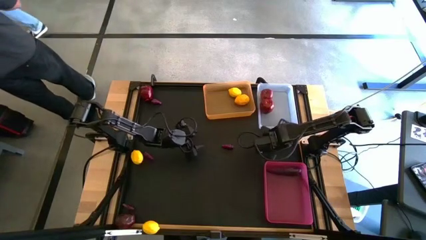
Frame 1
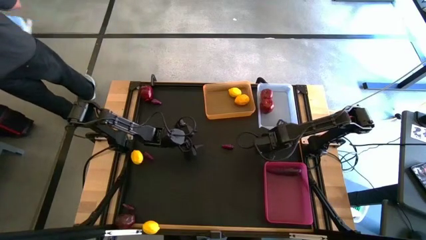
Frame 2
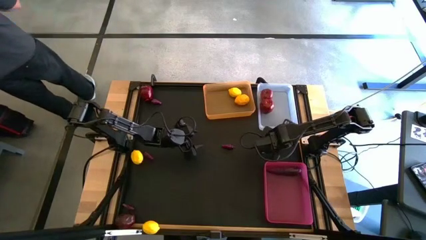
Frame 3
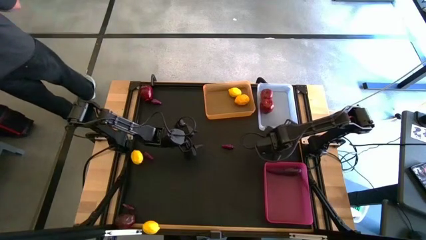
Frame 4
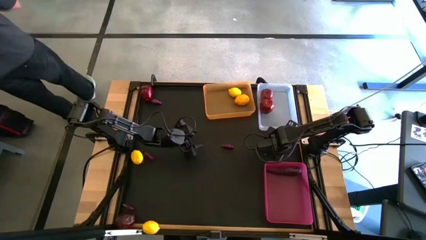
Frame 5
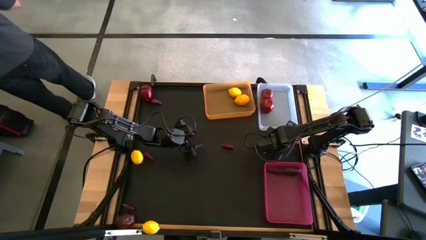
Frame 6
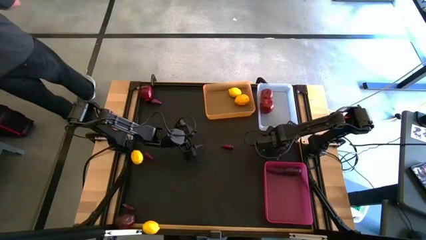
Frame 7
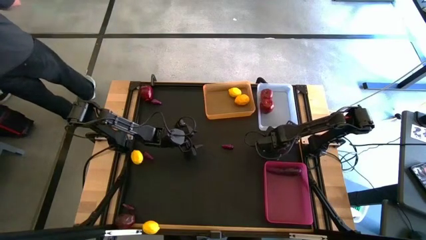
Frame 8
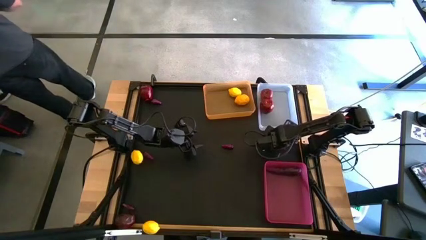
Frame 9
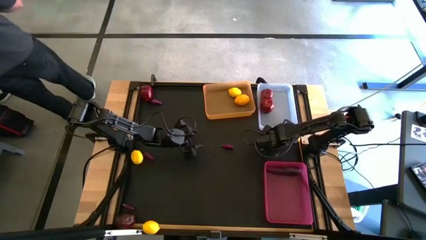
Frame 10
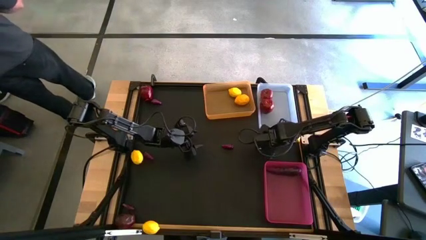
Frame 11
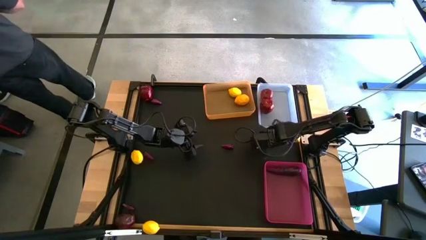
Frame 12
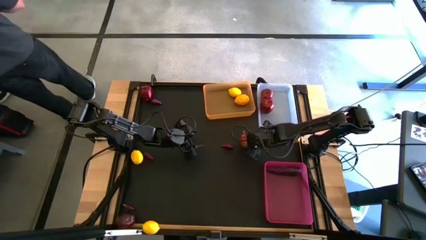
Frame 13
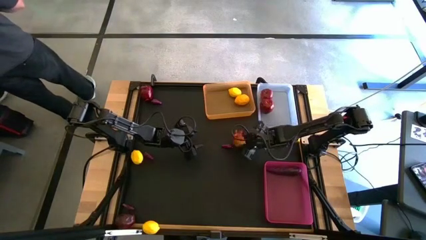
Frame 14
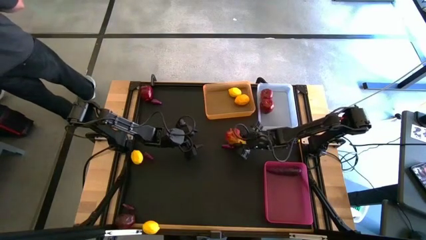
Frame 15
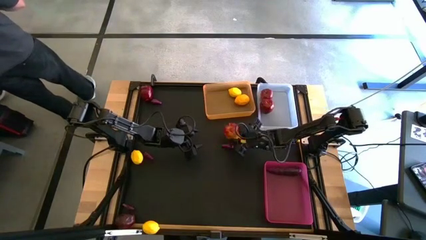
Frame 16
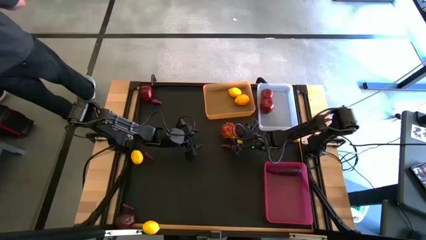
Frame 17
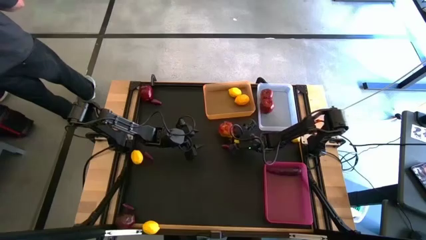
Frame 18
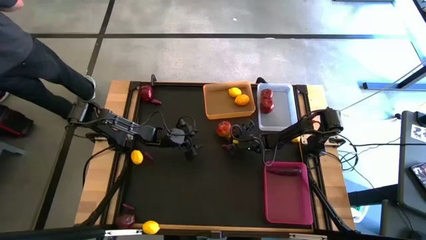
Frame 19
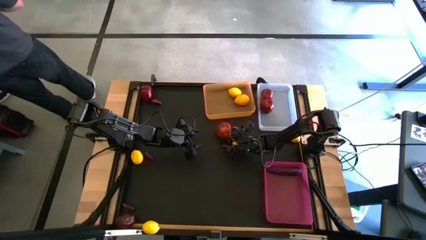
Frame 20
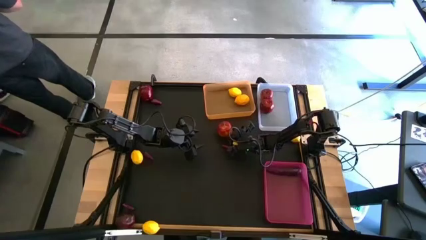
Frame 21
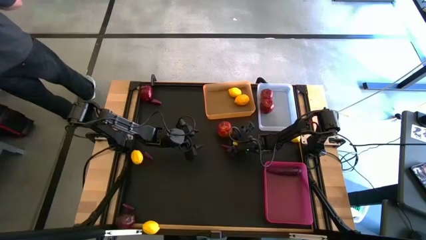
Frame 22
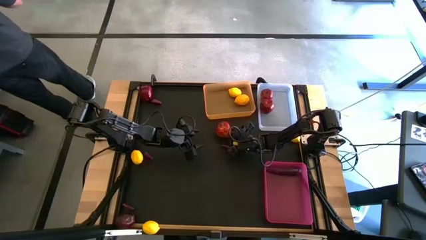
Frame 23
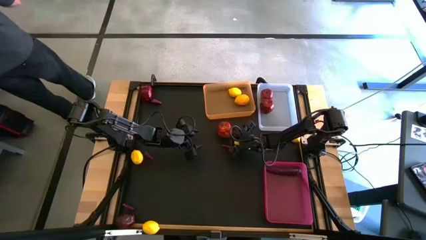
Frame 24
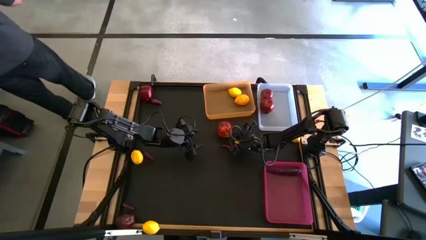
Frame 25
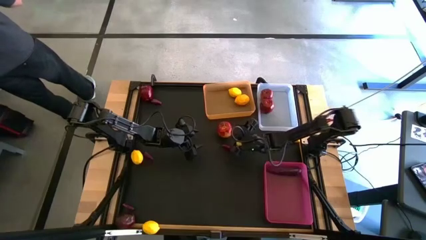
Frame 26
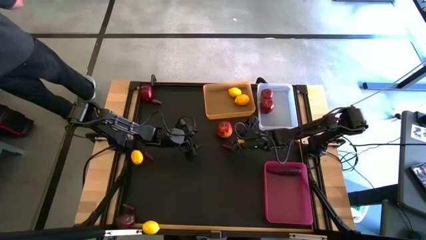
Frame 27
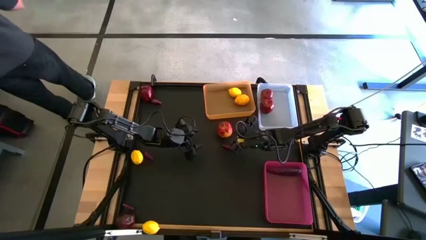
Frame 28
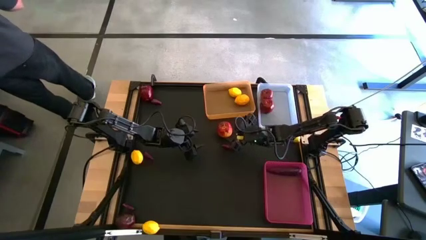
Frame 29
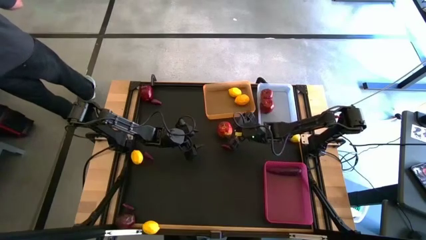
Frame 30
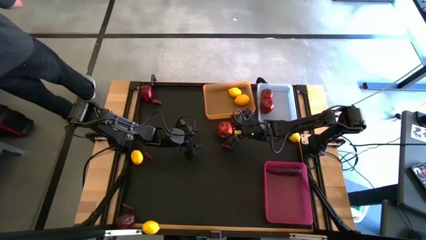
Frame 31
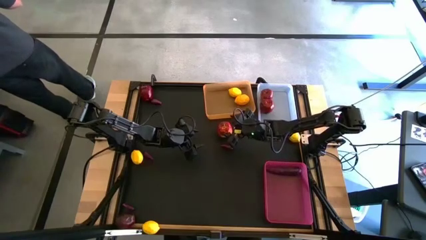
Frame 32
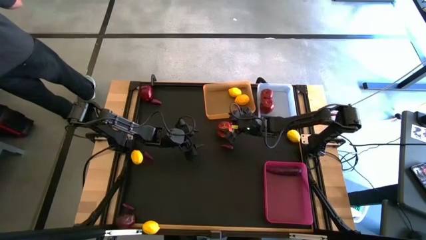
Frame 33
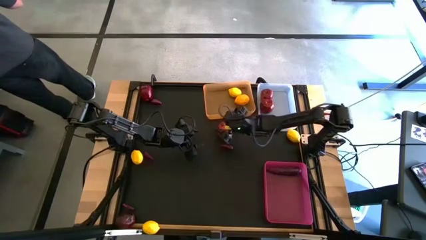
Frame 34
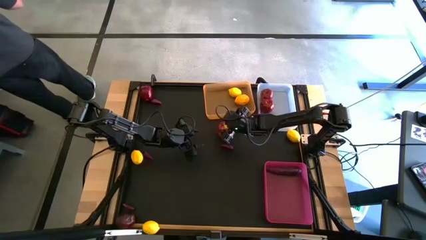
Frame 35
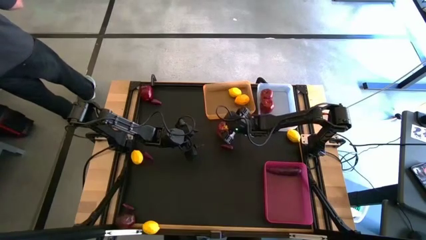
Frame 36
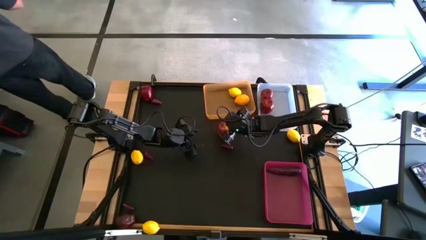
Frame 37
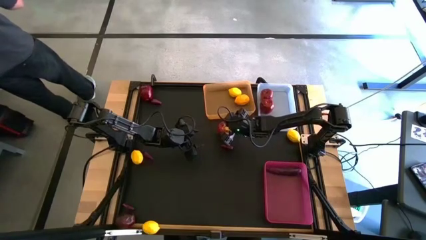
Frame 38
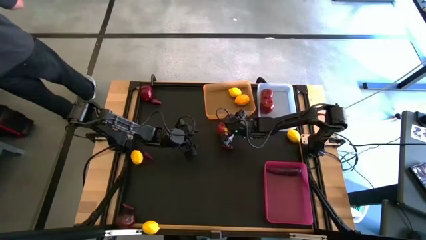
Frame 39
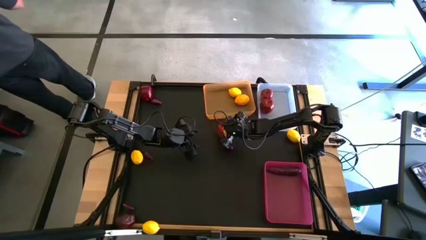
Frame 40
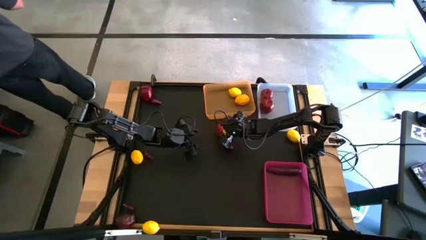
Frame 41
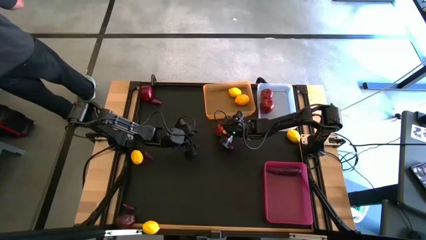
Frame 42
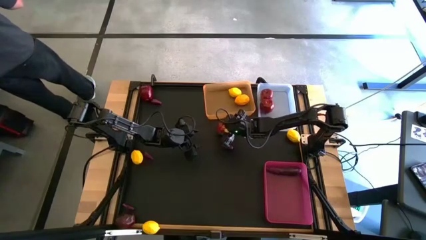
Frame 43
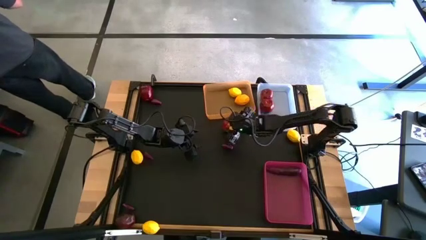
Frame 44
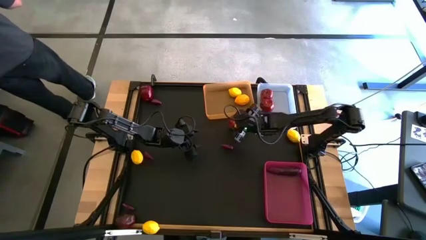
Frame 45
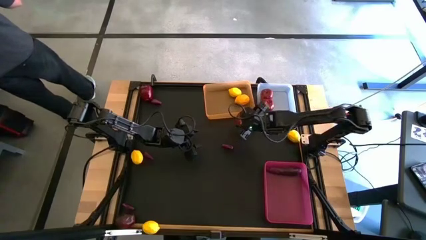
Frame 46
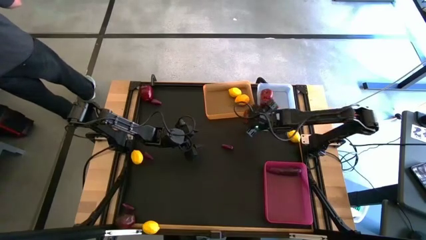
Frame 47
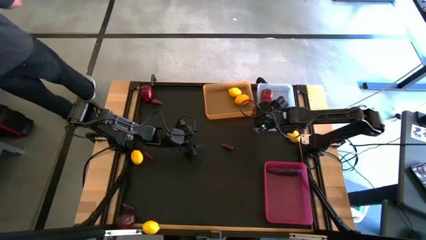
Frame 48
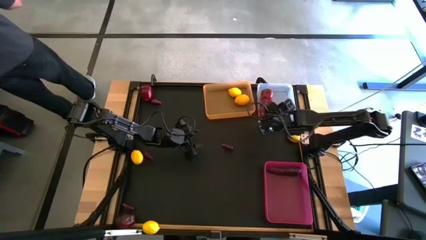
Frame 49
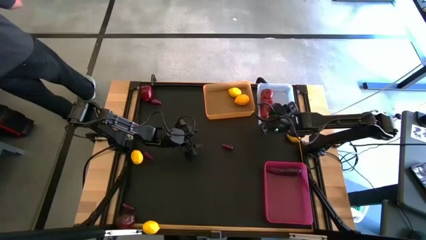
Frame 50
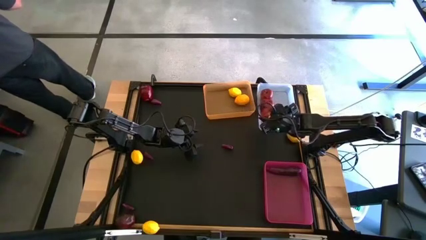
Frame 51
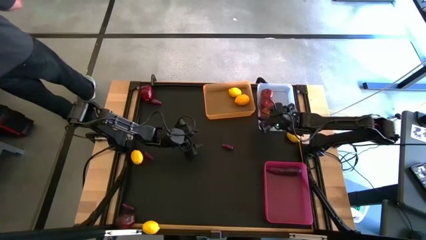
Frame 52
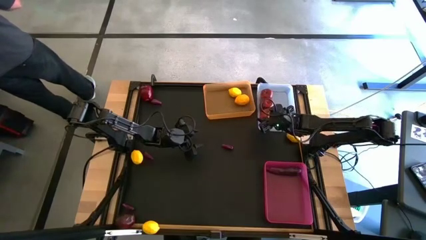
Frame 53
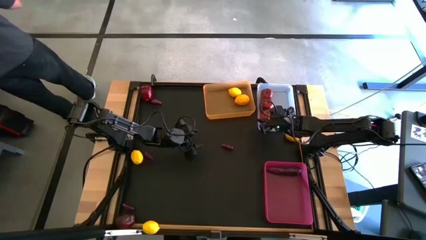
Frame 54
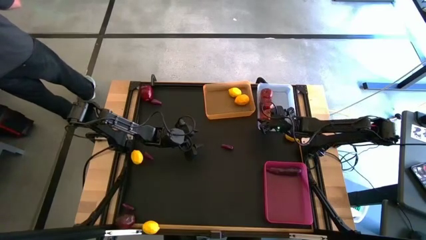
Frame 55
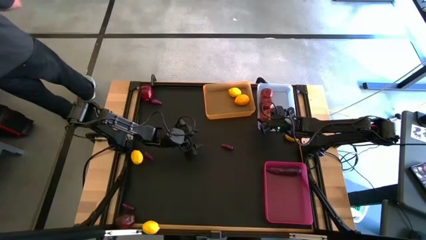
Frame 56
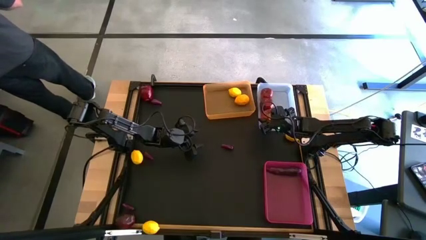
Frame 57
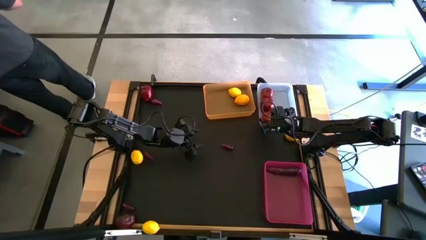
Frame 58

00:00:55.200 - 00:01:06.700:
Task: Sort produce into baskets
Put the red apple into the white bin

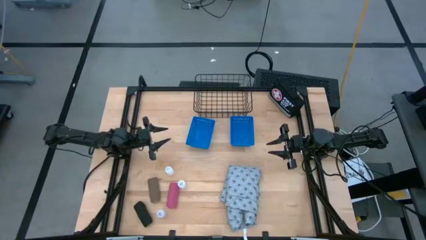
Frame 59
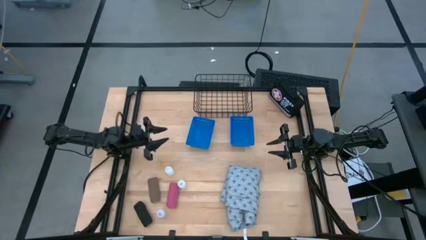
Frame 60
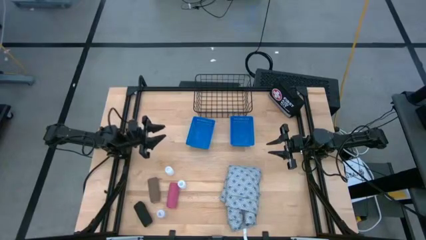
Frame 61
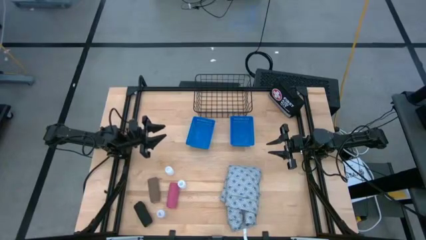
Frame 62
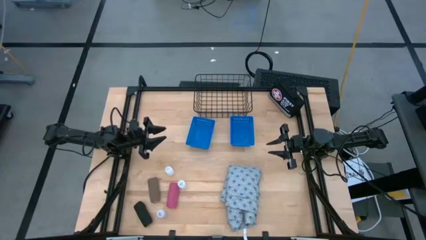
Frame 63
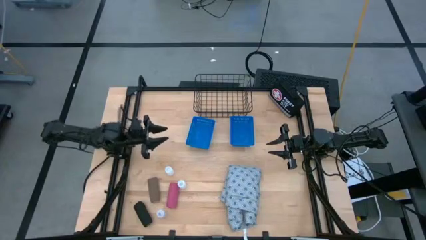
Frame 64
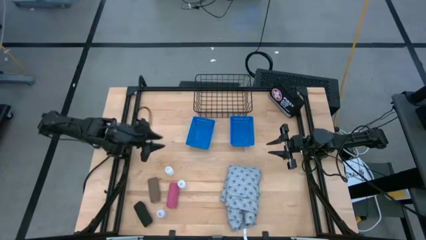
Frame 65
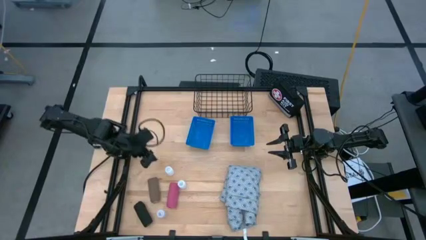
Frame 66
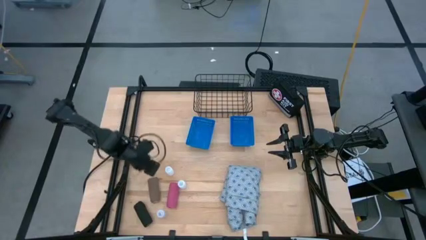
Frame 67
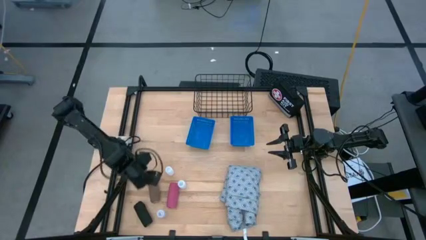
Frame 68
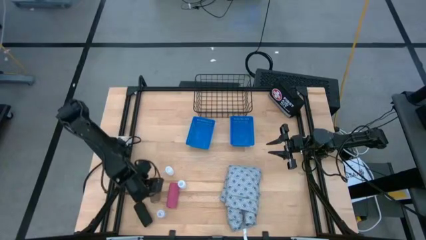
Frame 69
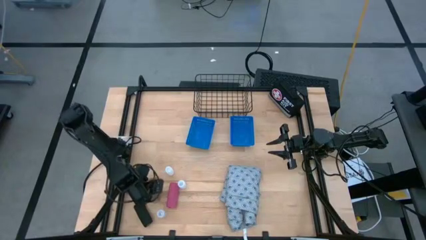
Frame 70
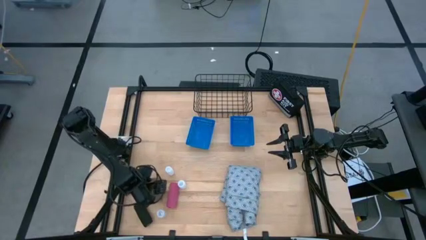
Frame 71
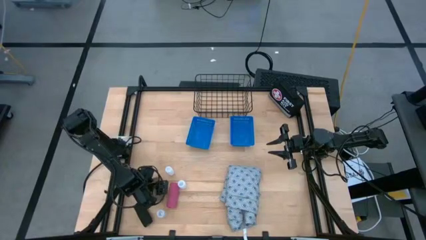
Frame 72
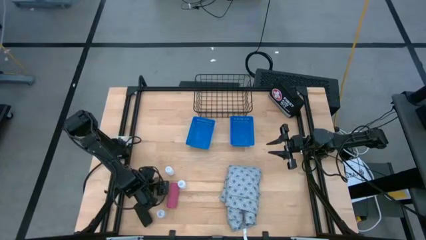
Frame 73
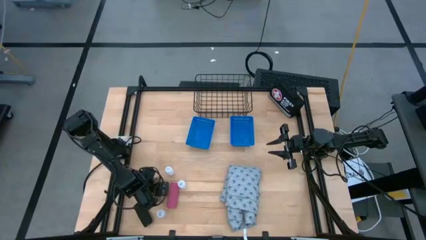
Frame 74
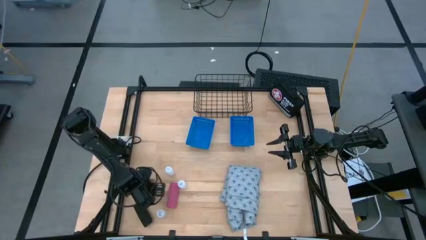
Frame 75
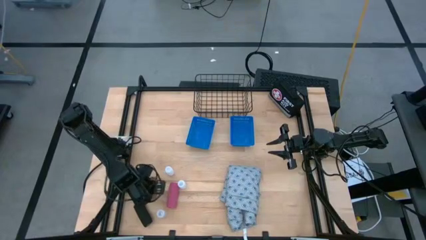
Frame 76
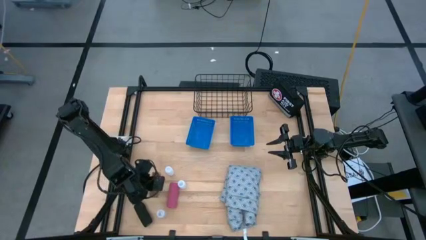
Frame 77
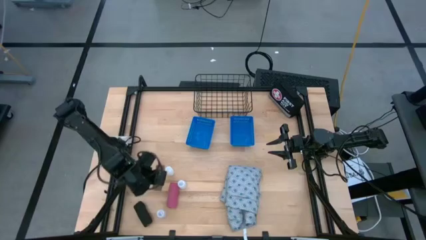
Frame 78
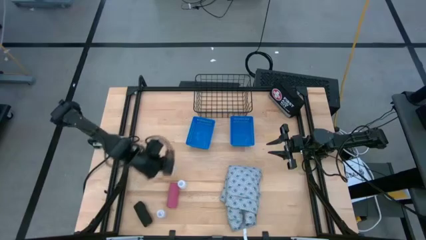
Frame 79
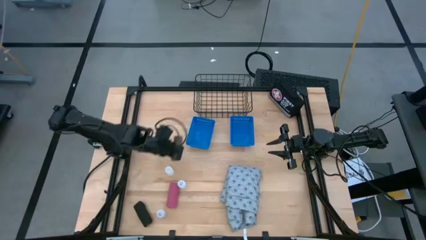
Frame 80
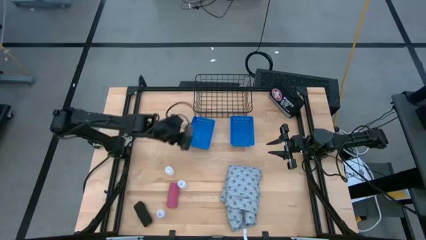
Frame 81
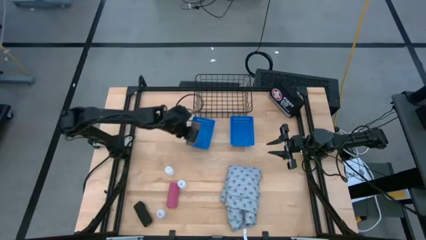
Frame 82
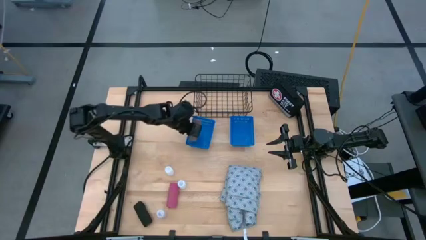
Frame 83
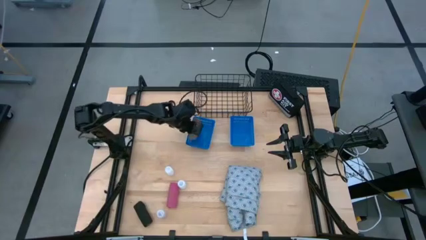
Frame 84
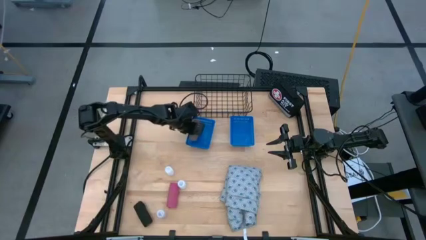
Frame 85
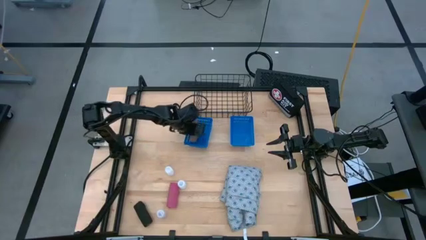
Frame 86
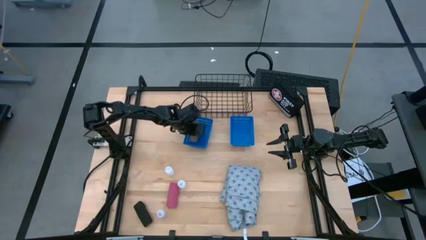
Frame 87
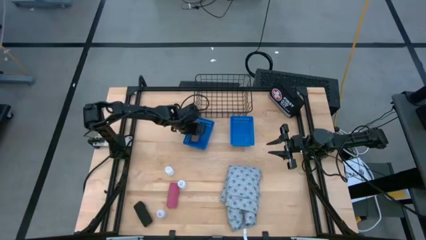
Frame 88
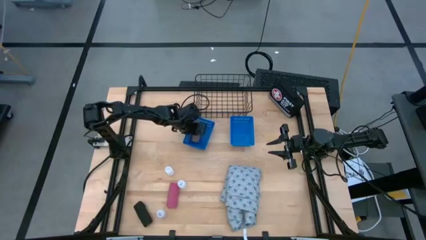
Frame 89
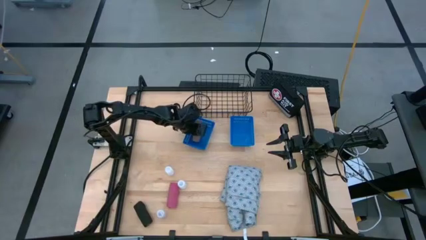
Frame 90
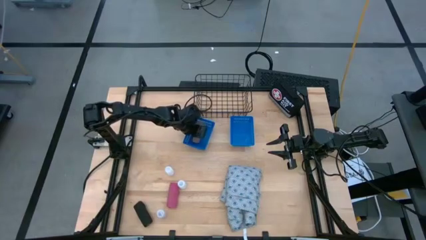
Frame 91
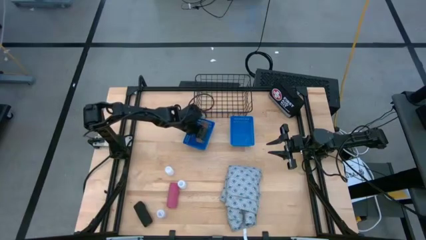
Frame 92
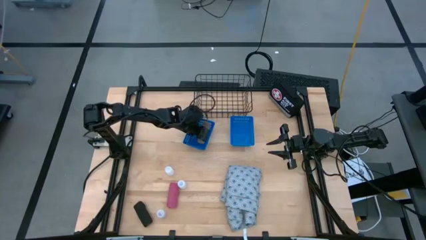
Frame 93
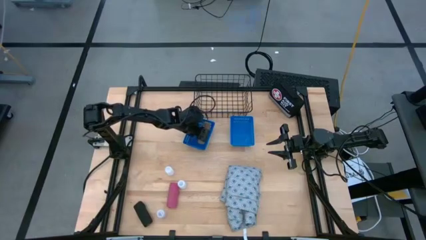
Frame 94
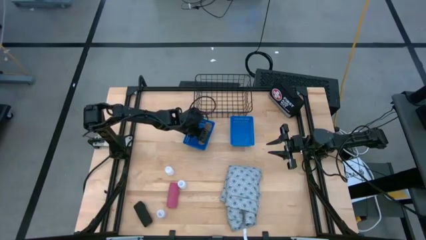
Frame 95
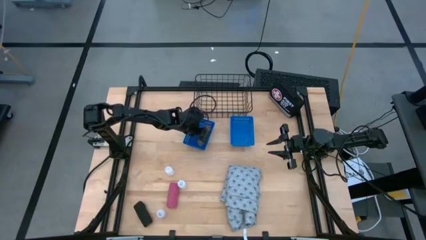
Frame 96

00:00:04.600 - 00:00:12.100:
Task: Pick & Place Medicine items
Put the brown bandage into the left blue bin
